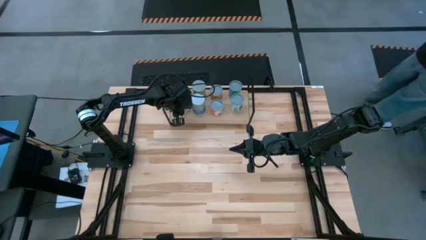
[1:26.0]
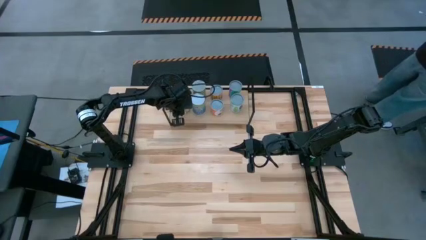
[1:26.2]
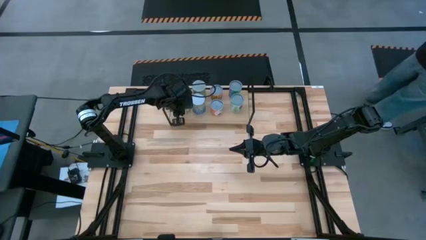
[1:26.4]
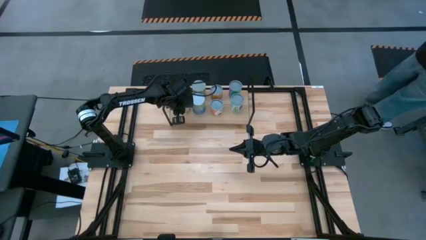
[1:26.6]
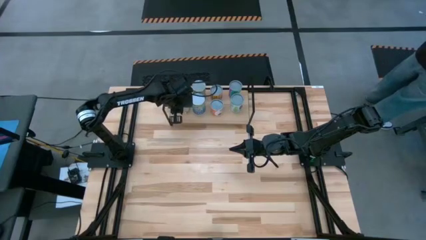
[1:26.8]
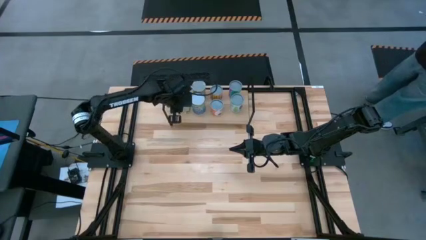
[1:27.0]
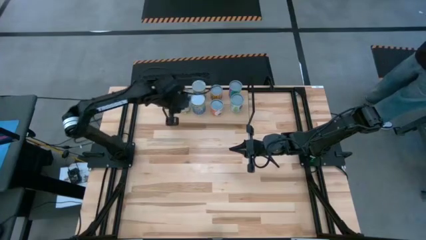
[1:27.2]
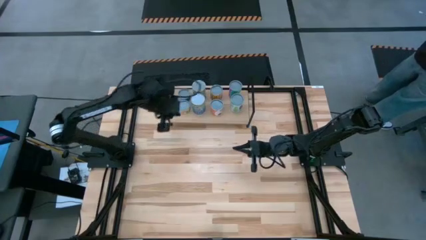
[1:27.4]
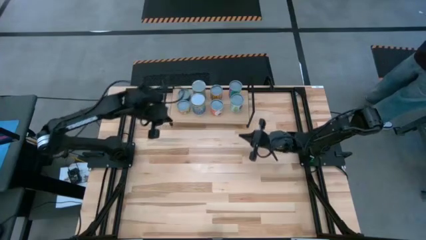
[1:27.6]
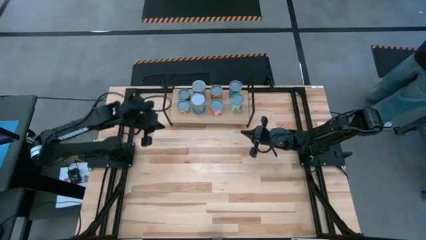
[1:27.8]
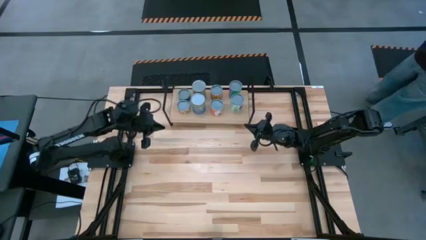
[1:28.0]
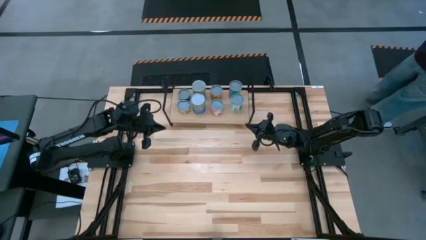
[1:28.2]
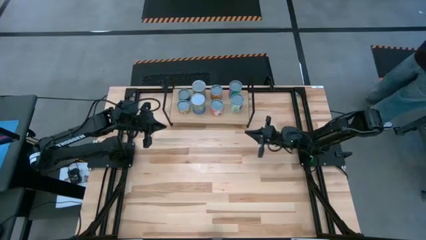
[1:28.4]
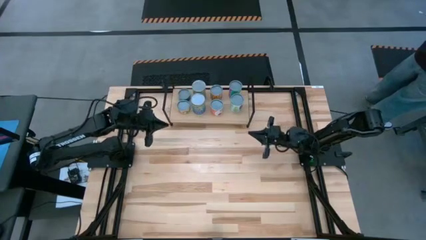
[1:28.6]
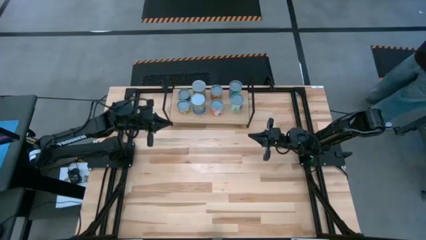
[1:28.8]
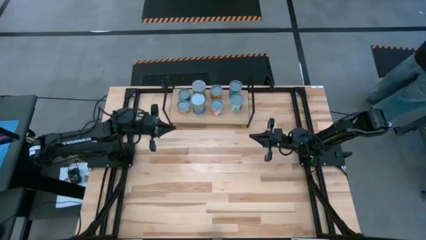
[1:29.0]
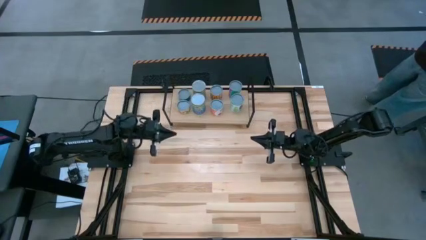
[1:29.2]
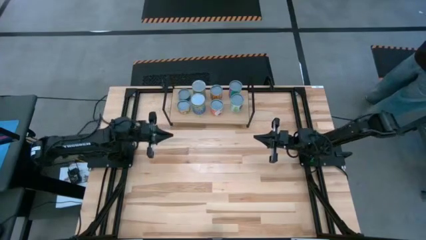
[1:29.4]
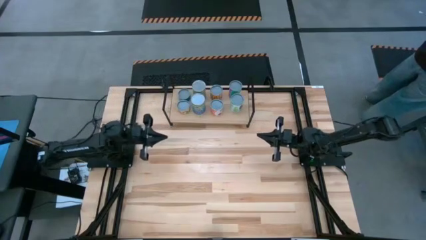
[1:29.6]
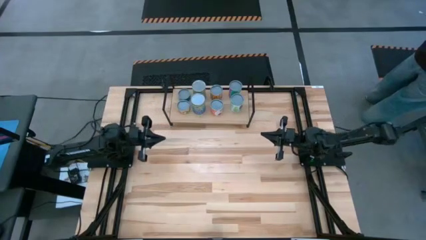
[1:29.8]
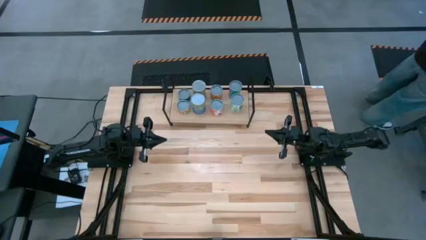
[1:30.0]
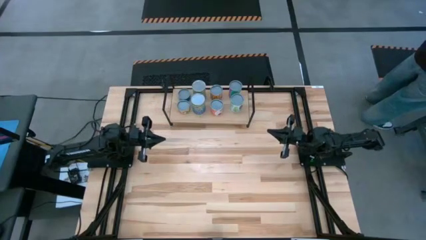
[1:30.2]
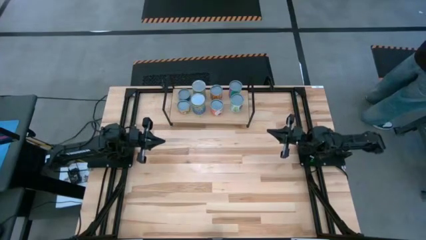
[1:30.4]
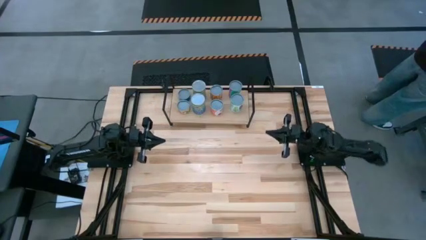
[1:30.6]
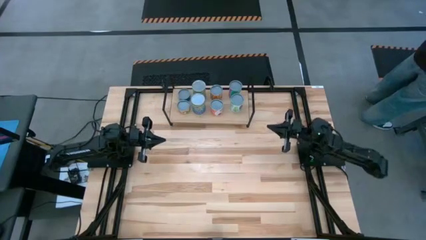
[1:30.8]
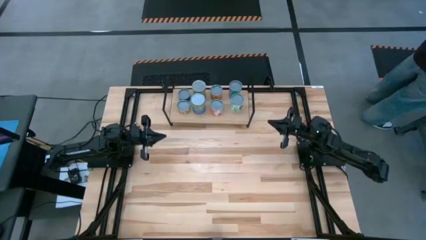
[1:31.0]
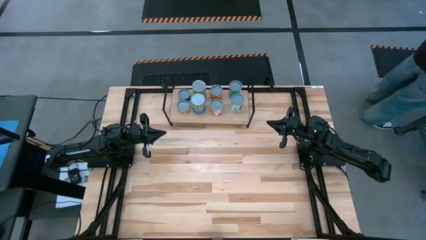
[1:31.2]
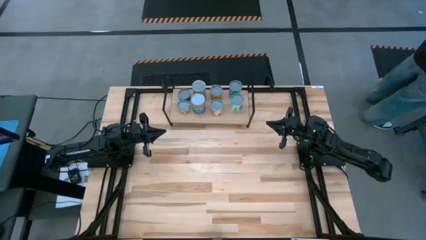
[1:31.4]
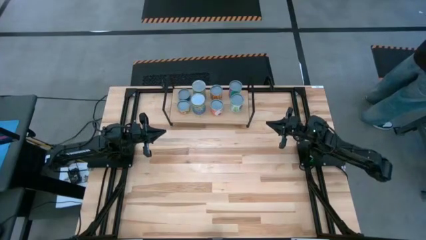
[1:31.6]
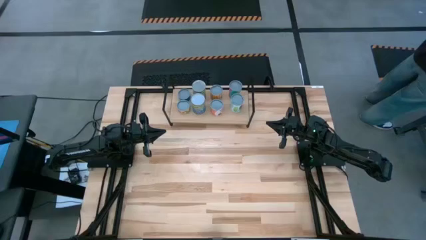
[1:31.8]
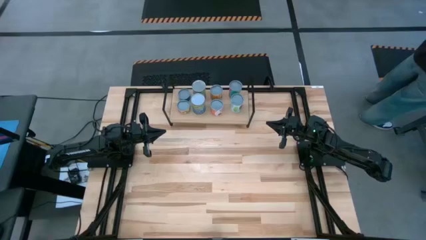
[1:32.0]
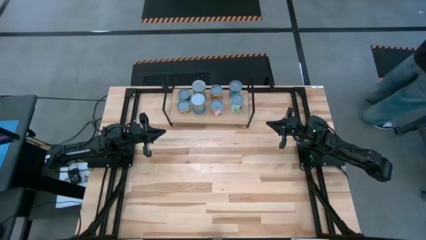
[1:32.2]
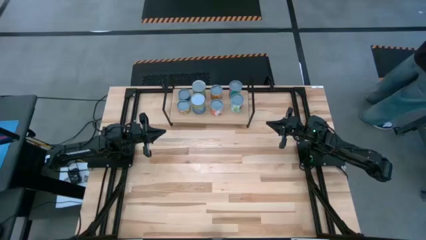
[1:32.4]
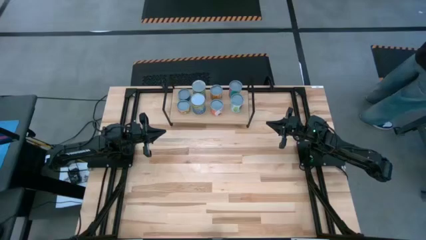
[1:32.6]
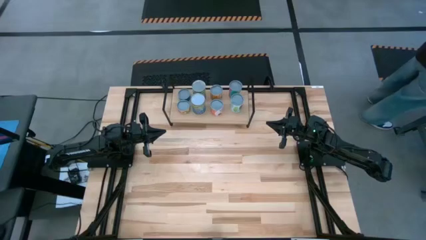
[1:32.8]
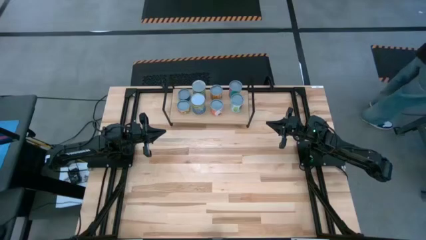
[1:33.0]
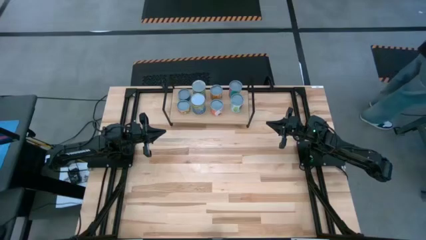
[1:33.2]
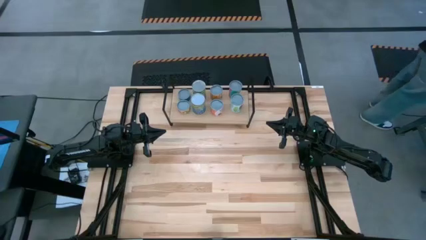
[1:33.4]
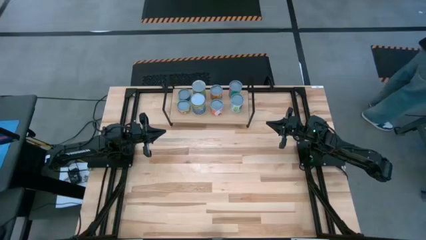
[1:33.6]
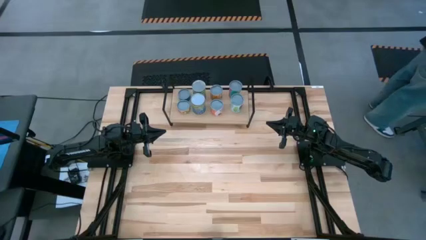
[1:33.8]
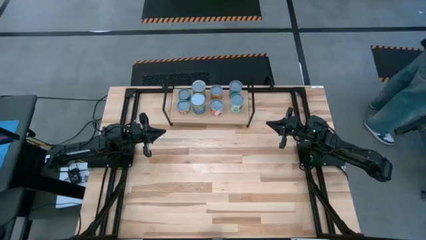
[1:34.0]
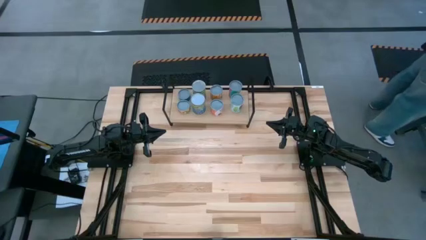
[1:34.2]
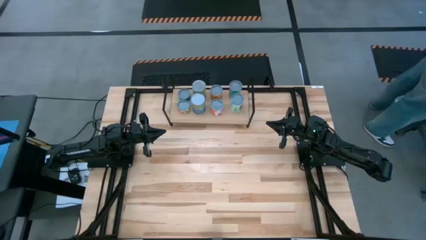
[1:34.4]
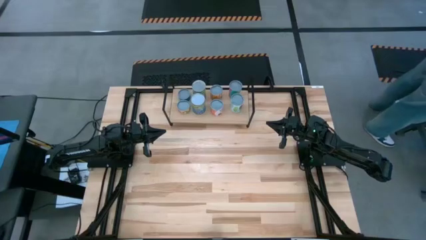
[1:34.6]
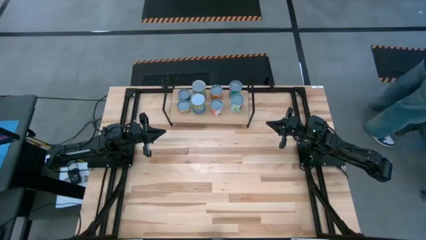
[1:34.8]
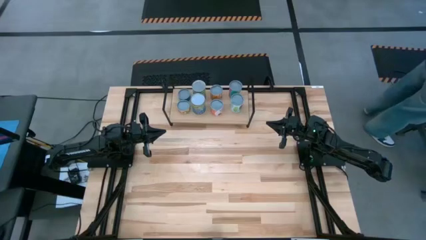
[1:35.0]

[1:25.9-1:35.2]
Task: Pick and place cans onto a shelf
Return to Home Position
